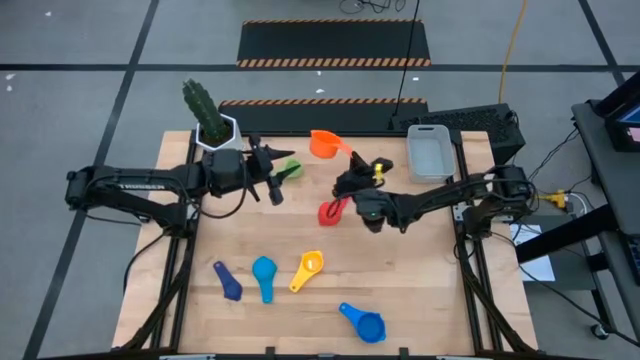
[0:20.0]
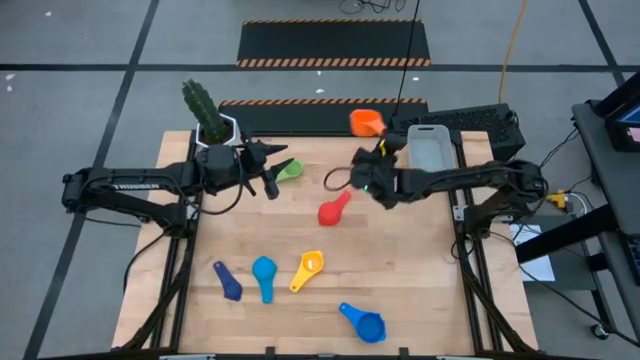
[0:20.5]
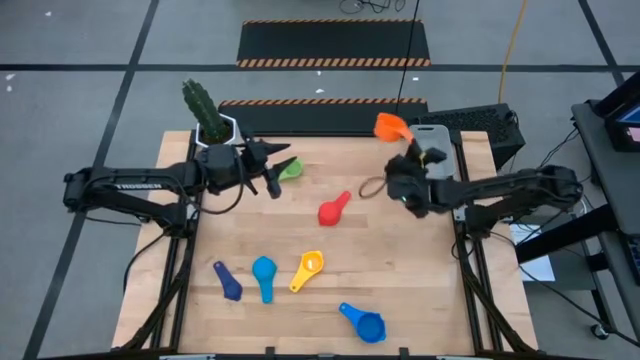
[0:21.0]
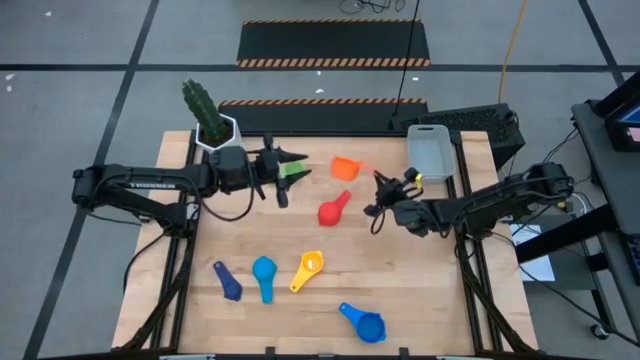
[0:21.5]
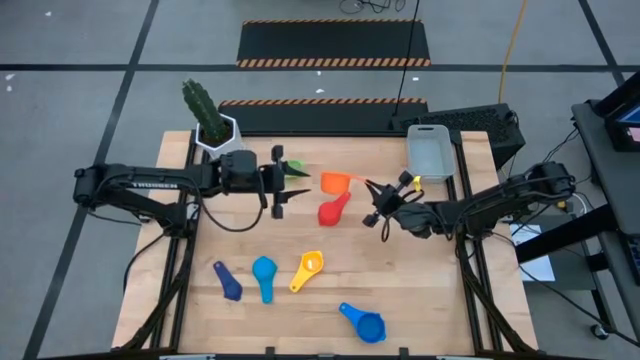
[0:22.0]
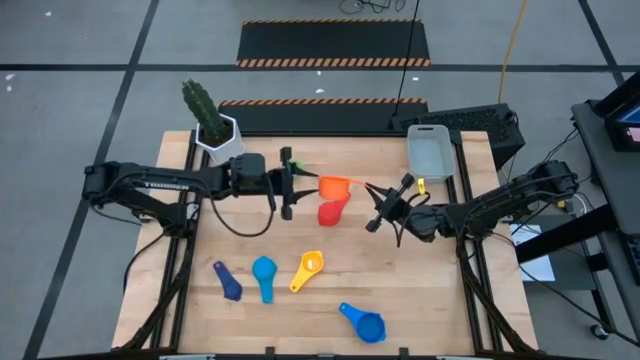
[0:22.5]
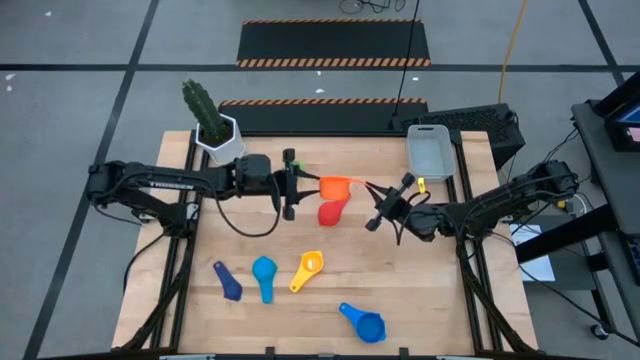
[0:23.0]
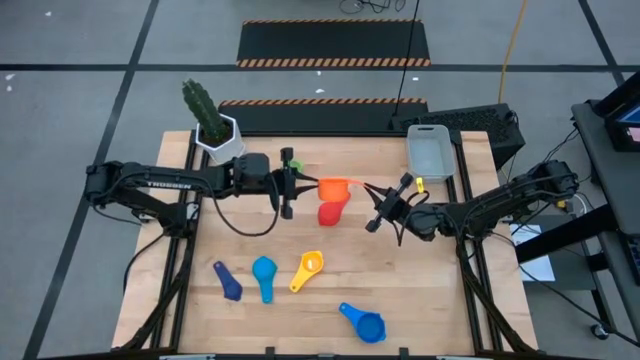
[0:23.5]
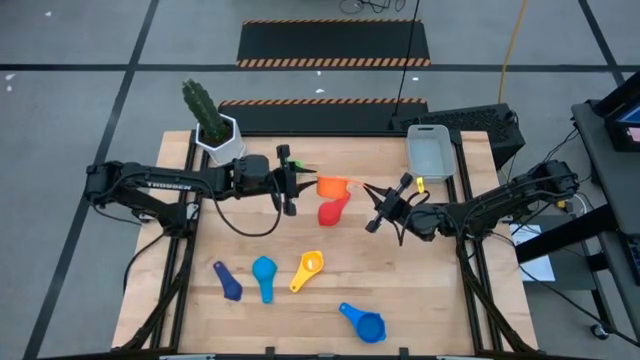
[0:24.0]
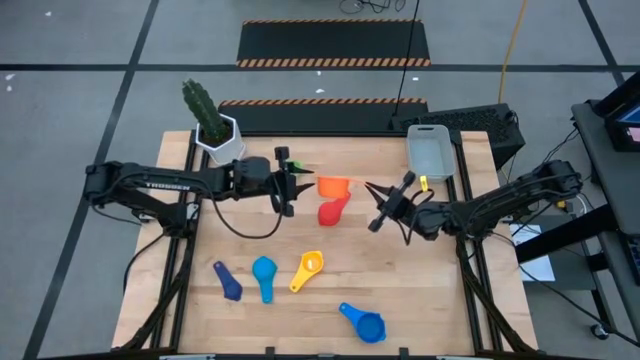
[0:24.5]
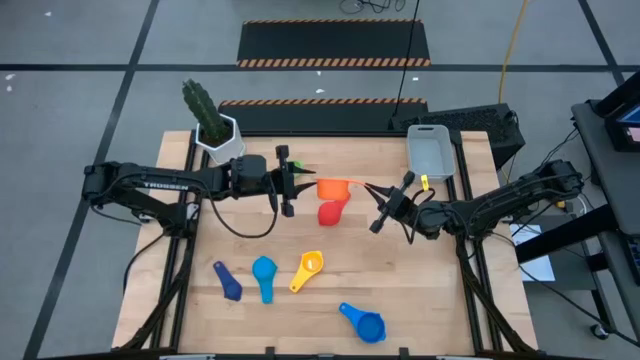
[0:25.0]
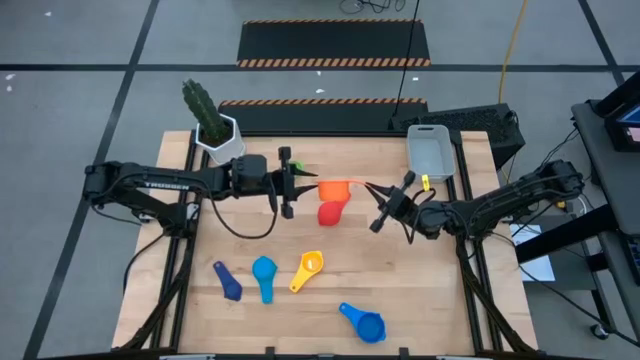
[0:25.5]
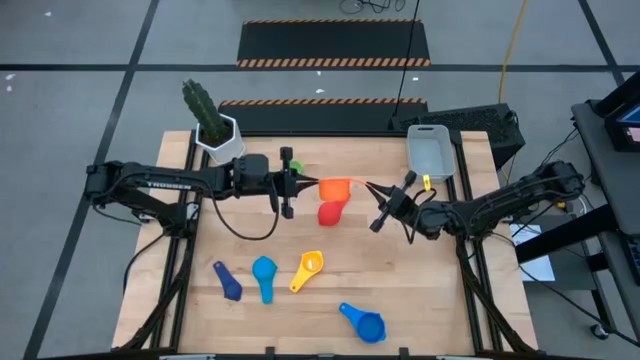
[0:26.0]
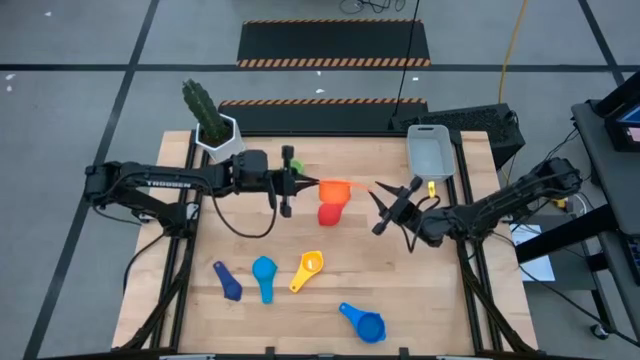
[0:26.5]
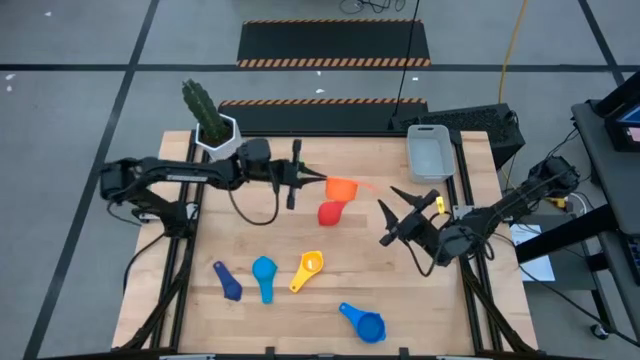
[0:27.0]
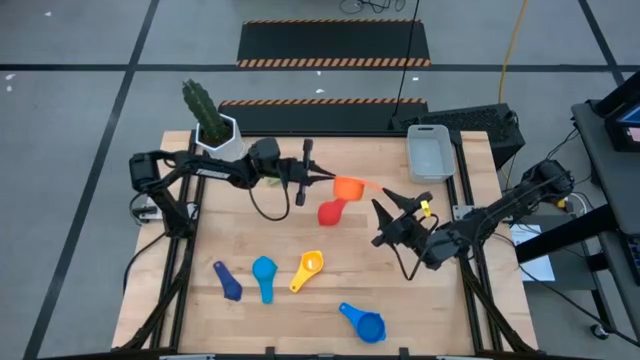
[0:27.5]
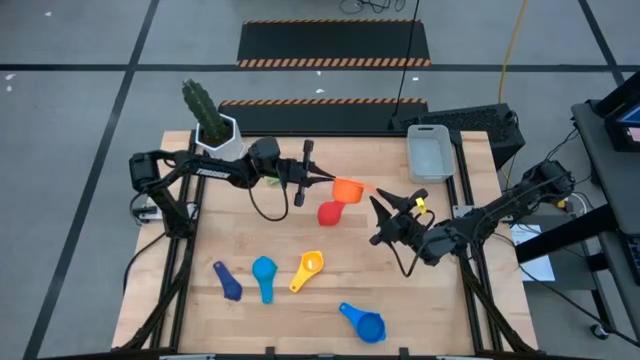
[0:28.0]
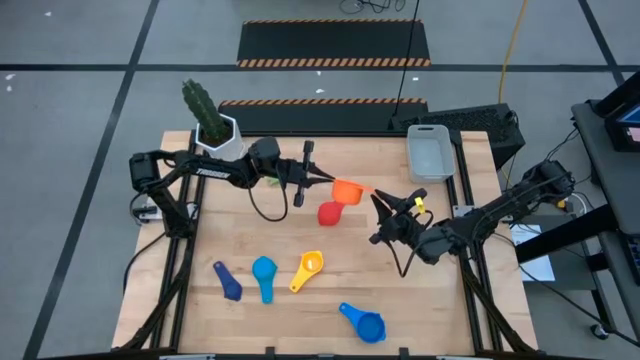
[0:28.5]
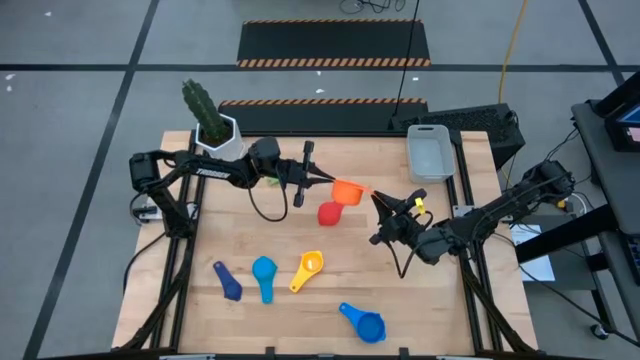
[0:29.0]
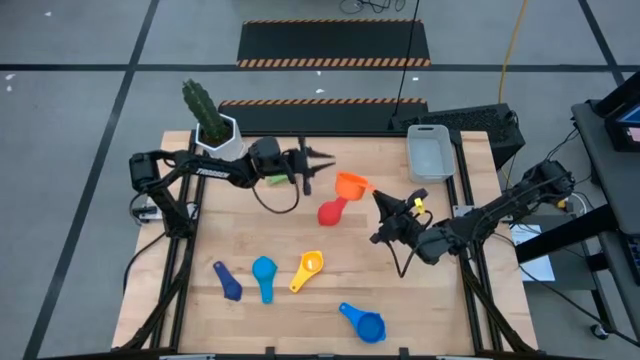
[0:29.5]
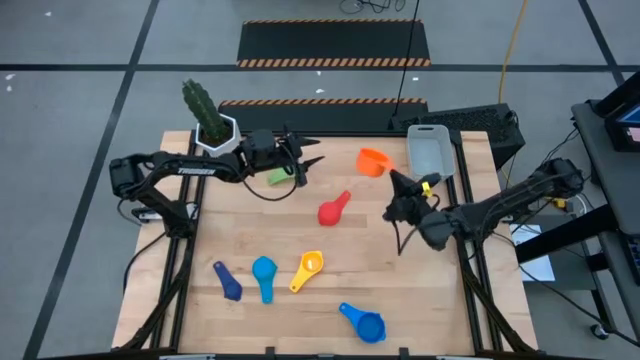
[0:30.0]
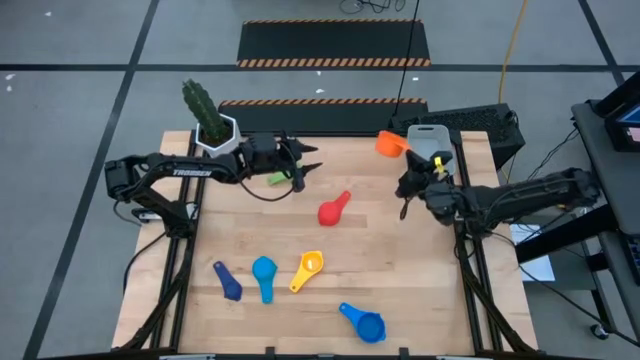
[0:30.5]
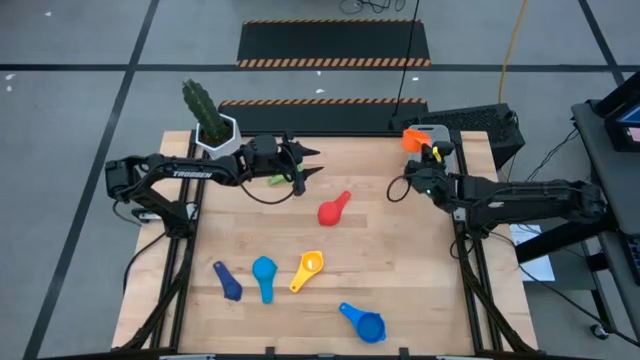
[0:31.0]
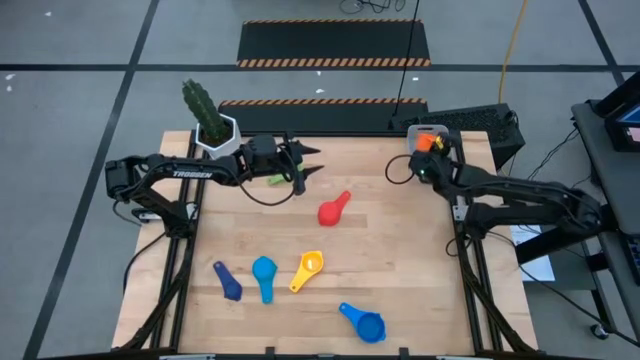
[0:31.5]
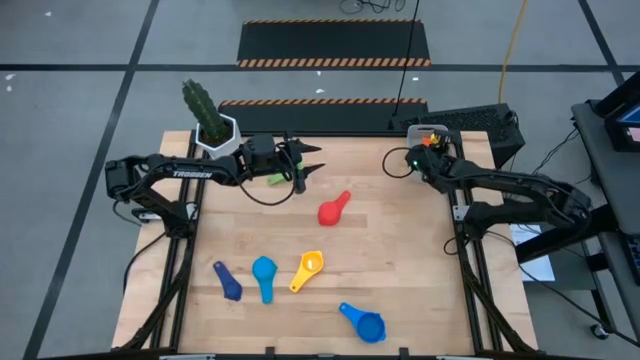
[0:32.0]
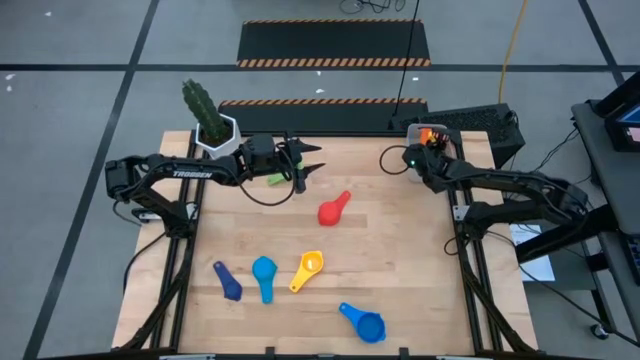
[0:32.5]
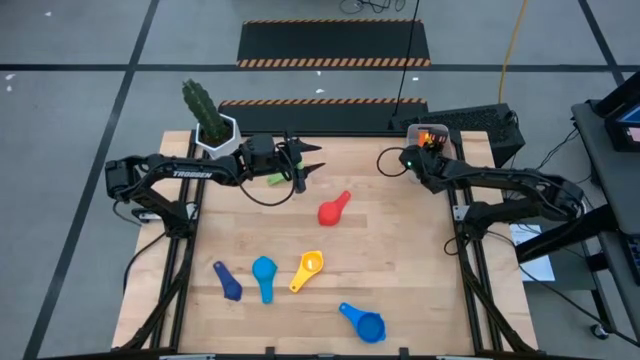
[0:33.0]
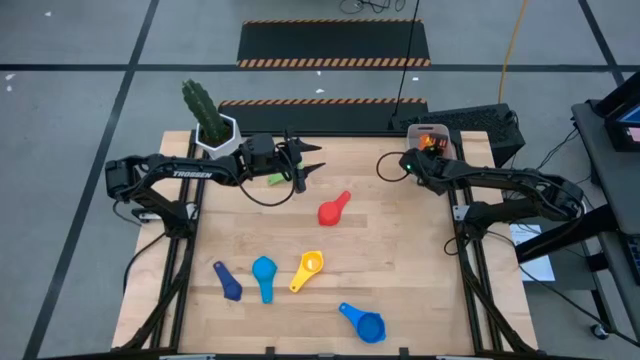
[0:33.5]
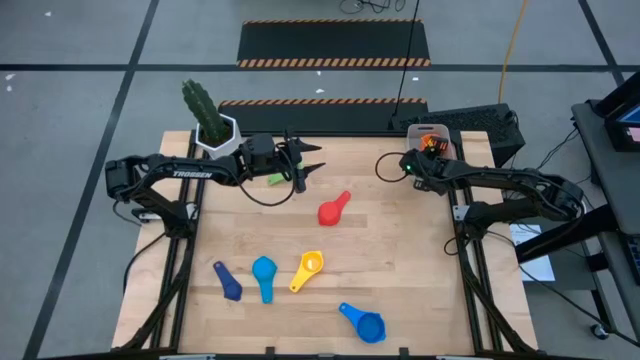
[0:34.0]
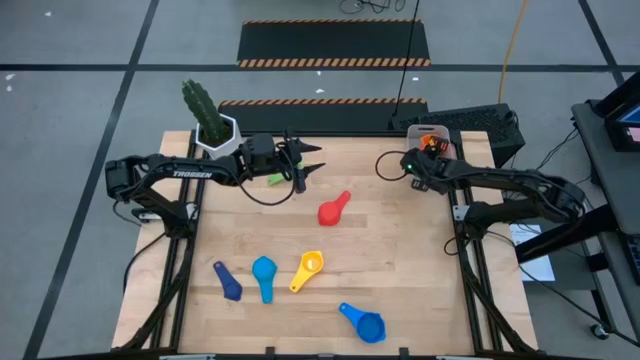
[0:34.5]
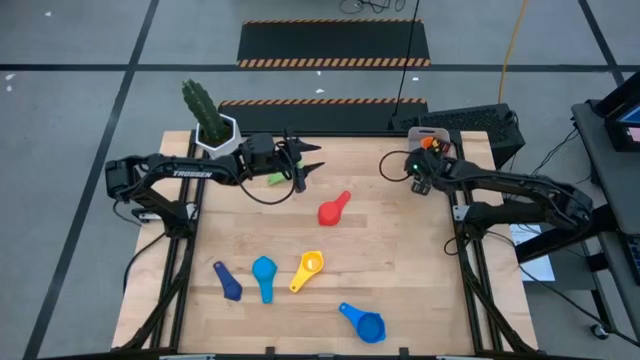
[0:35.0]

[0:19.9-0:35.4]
Task: Nest measuring cups in basket
Put the orange measuring cup in the gray bin

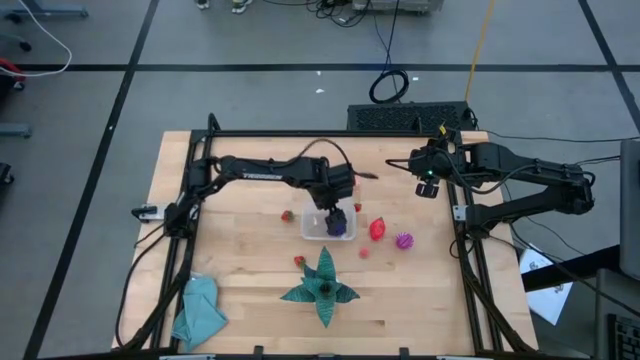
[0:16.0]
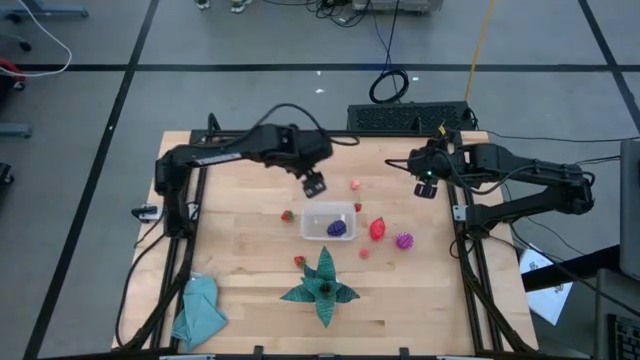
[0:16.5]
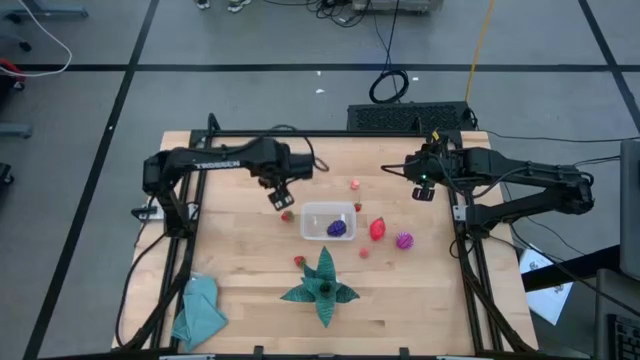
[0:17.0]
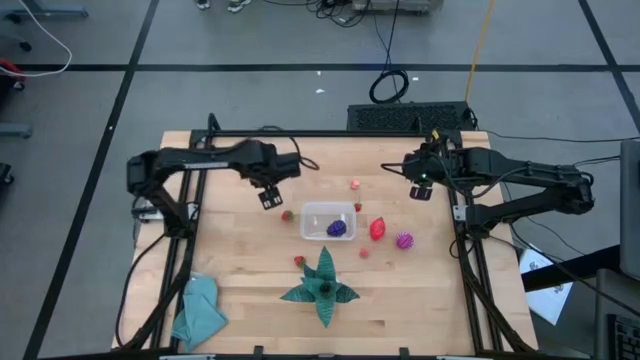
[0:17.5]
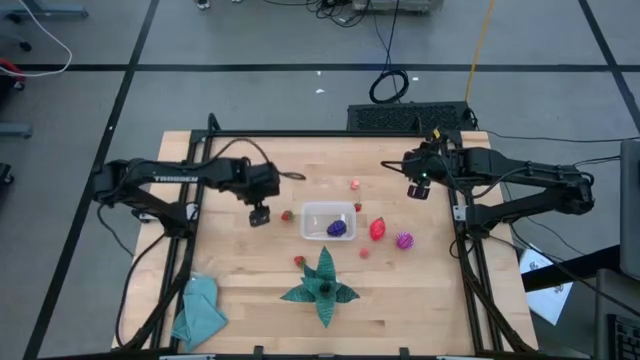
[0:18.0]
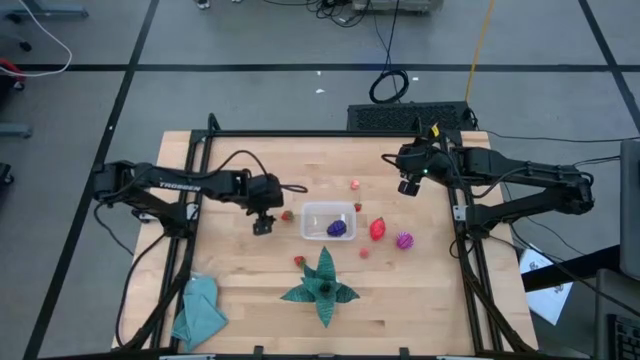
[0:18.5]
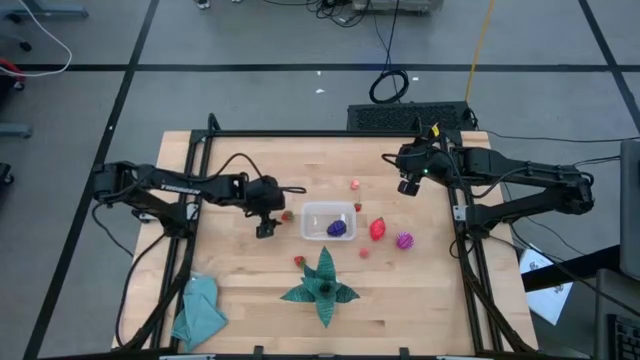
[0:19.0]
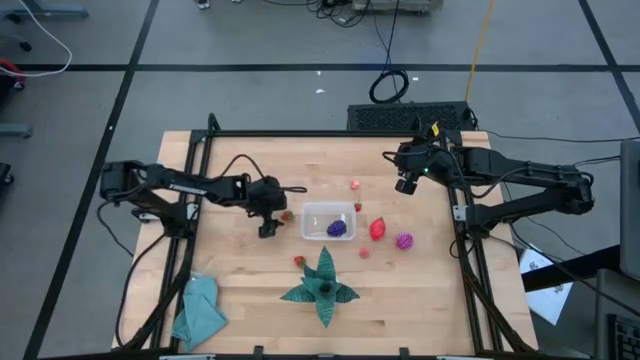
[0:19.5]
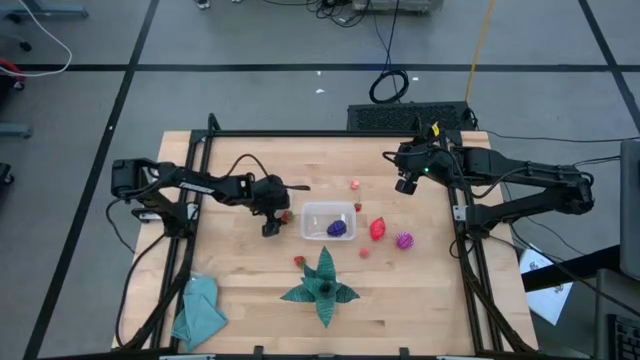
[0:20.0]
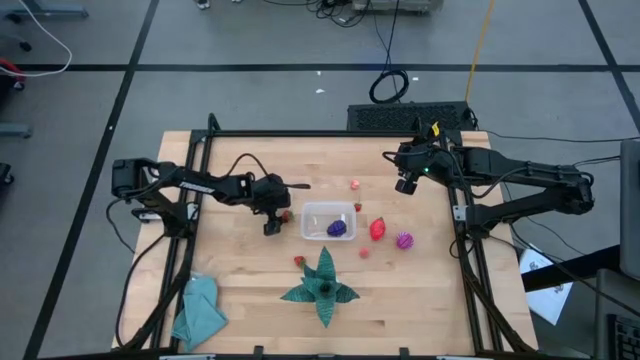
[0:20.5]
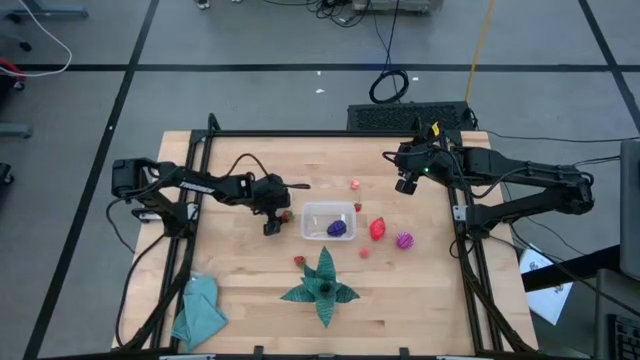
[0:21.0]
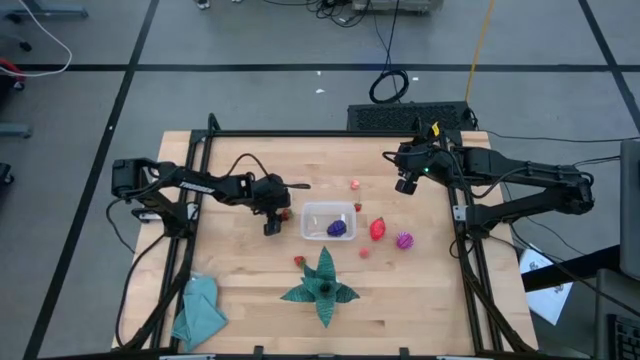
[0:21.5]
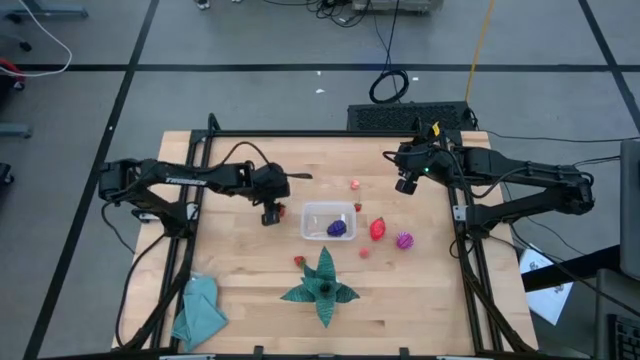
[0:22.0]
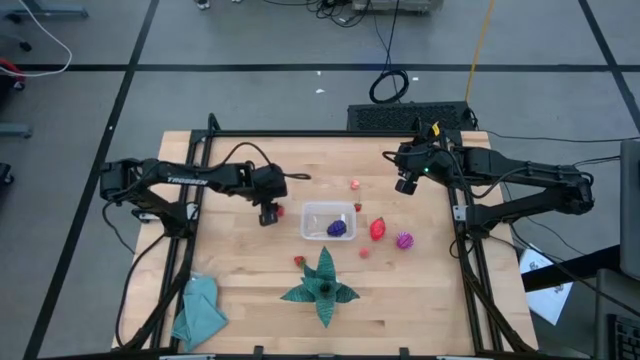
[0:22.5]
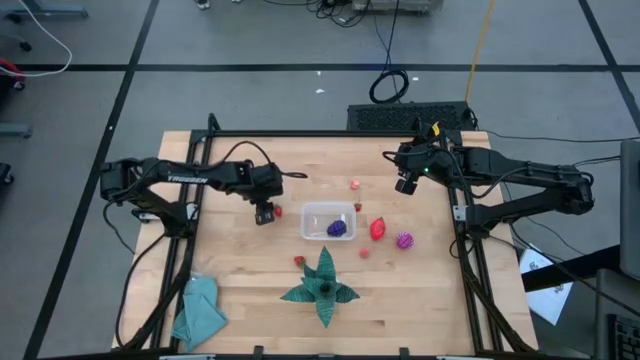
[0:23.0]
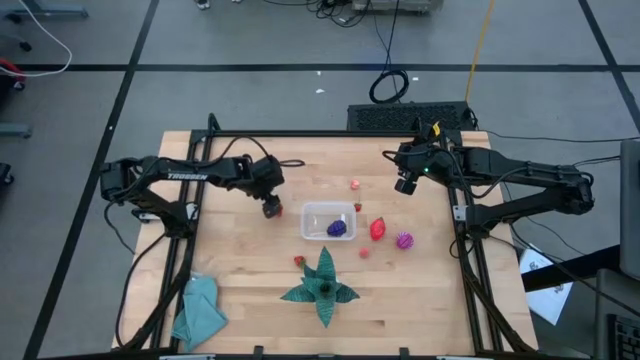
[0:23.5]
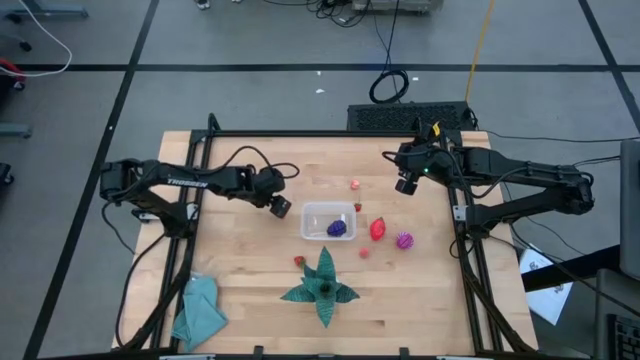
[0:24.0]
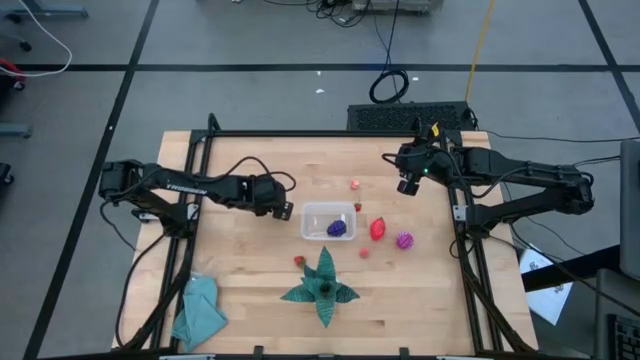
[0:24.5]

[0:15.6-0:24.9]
Task: Pick and placing Produce into tupperware
Put the red strawberry into the transparent bin
